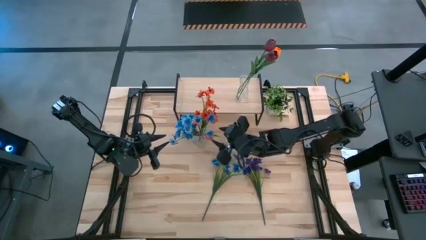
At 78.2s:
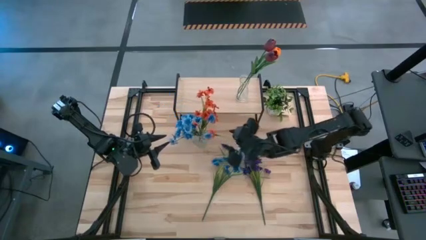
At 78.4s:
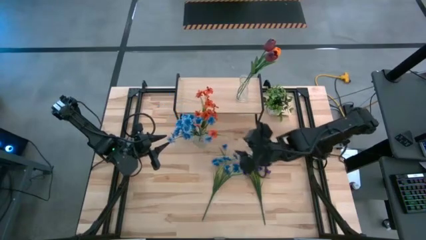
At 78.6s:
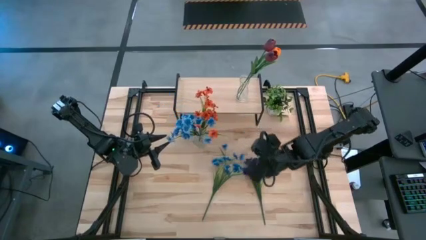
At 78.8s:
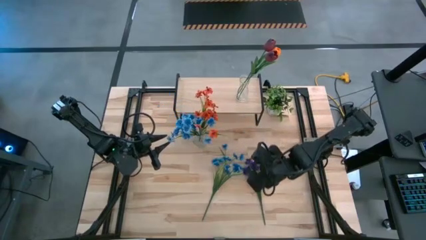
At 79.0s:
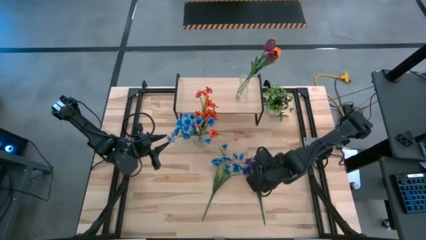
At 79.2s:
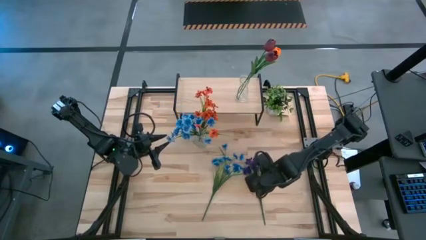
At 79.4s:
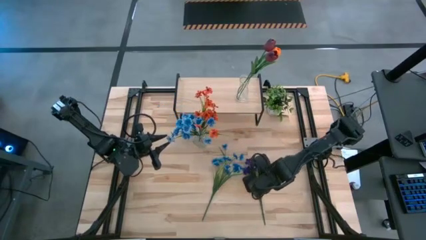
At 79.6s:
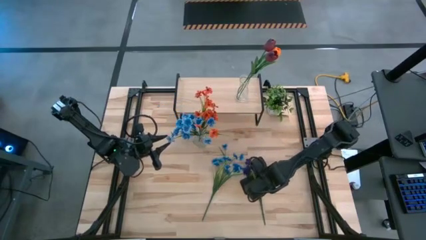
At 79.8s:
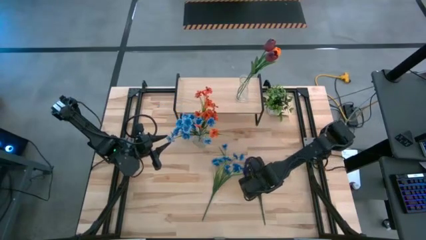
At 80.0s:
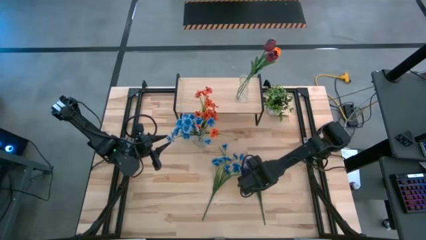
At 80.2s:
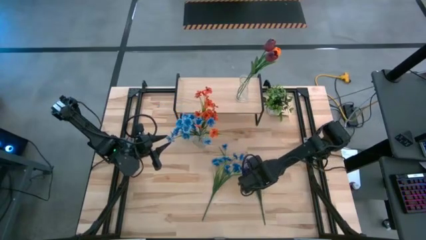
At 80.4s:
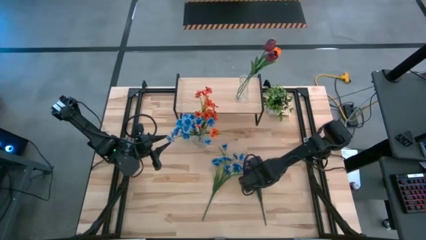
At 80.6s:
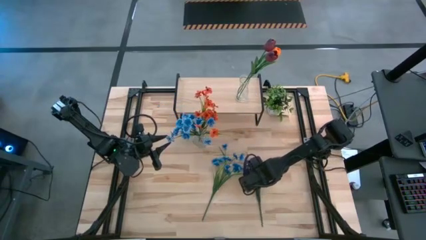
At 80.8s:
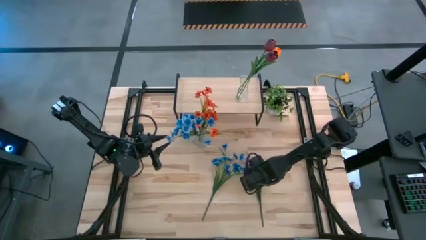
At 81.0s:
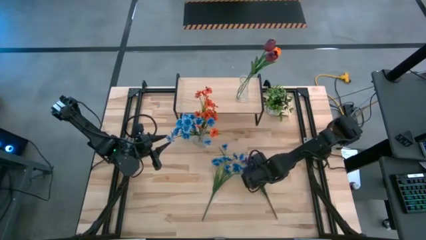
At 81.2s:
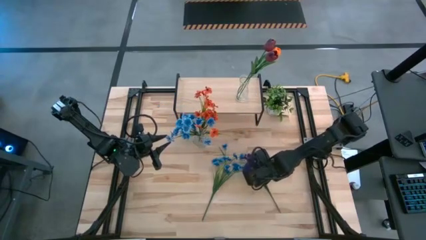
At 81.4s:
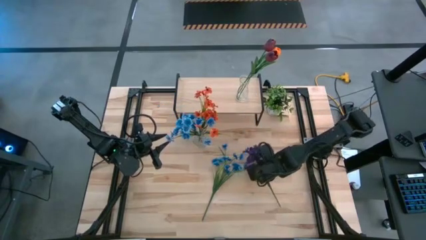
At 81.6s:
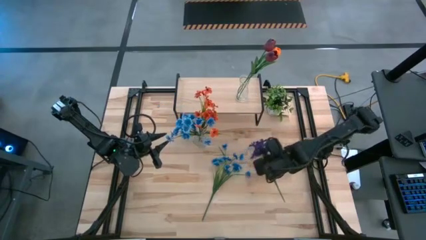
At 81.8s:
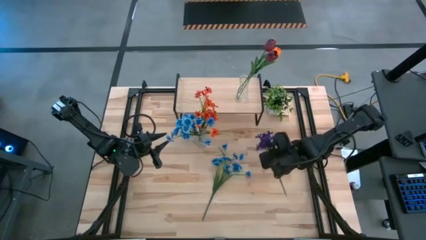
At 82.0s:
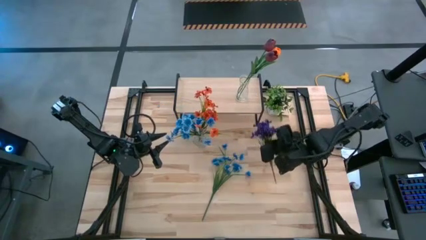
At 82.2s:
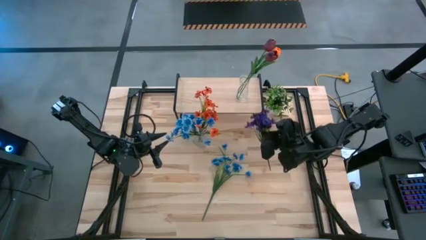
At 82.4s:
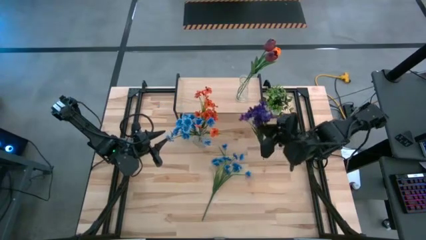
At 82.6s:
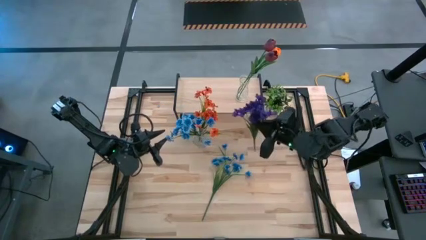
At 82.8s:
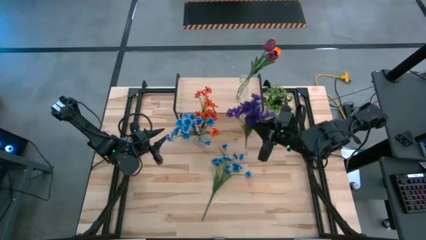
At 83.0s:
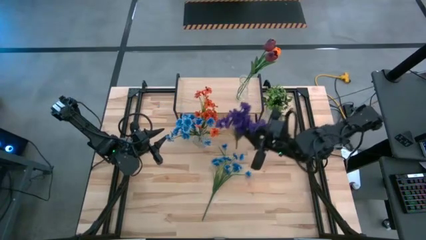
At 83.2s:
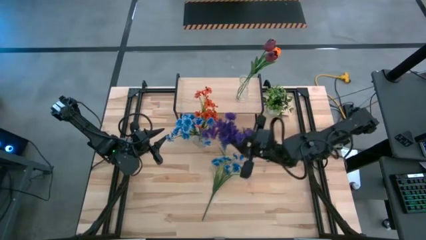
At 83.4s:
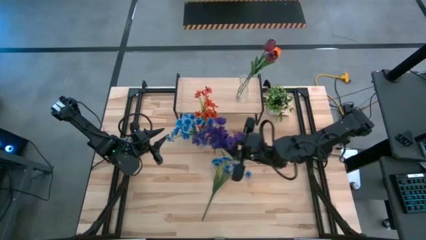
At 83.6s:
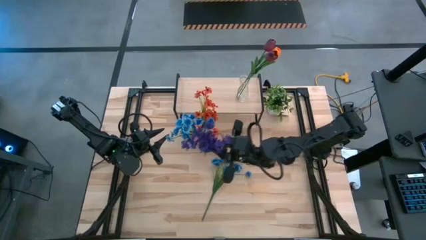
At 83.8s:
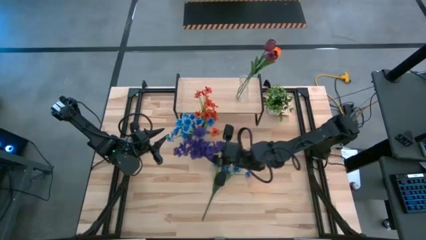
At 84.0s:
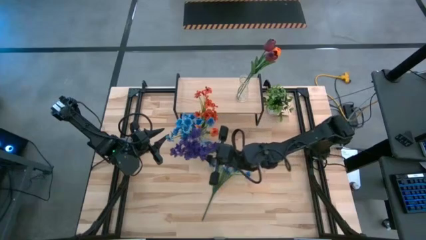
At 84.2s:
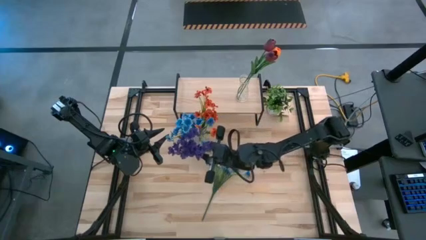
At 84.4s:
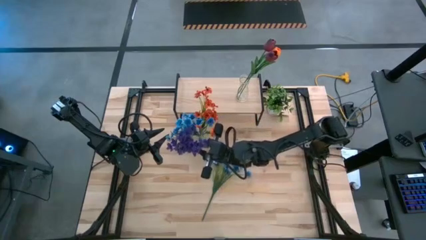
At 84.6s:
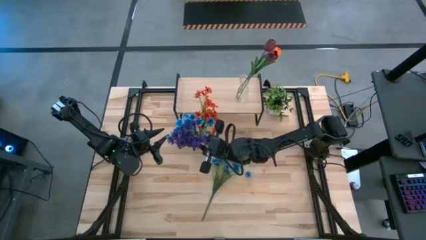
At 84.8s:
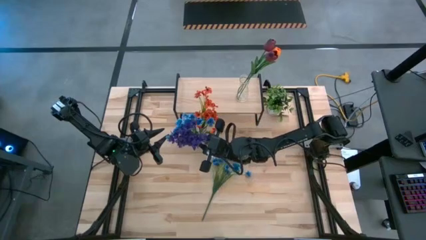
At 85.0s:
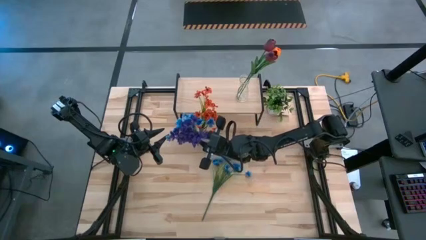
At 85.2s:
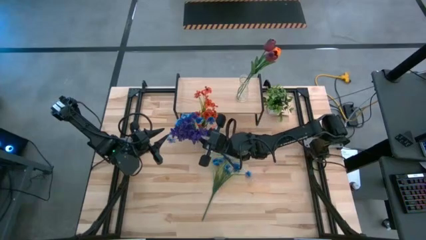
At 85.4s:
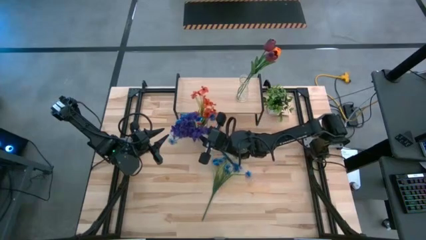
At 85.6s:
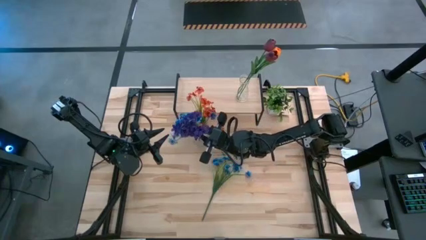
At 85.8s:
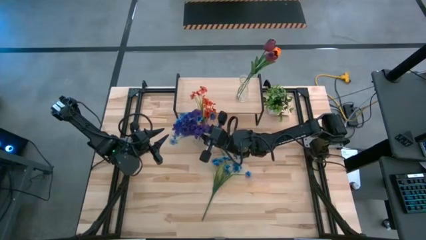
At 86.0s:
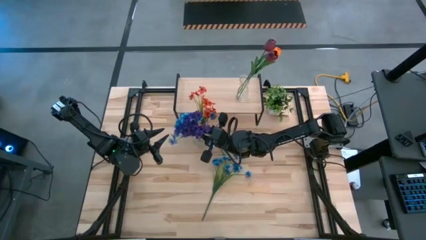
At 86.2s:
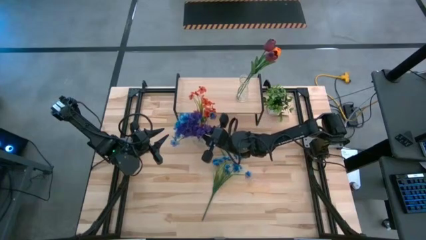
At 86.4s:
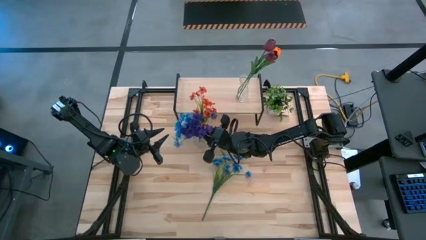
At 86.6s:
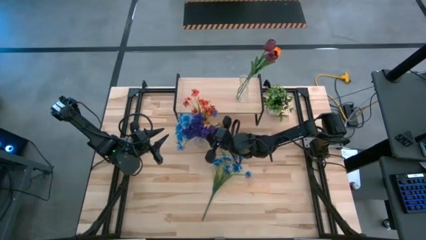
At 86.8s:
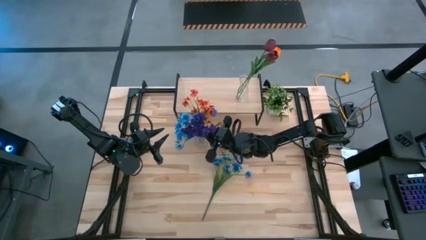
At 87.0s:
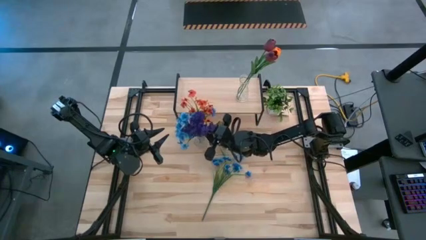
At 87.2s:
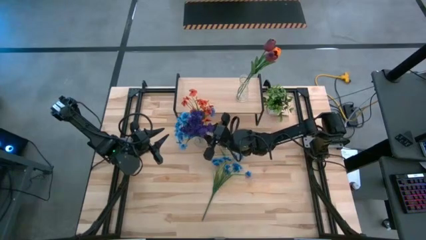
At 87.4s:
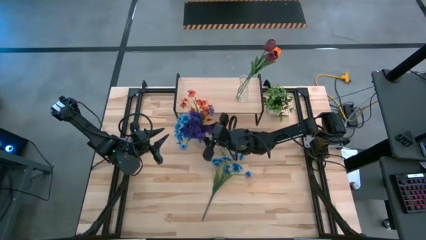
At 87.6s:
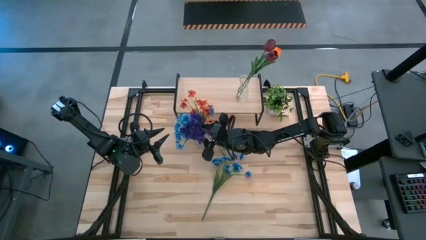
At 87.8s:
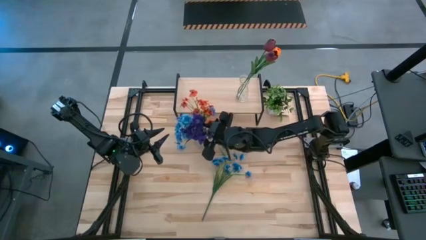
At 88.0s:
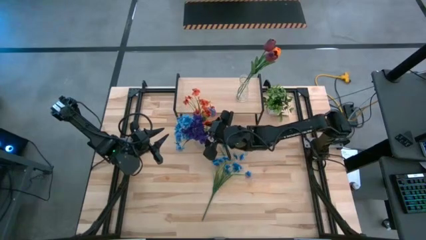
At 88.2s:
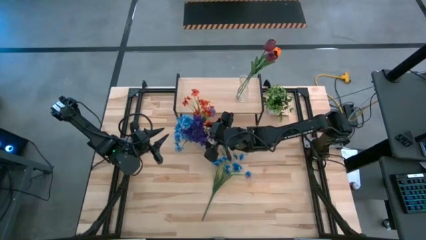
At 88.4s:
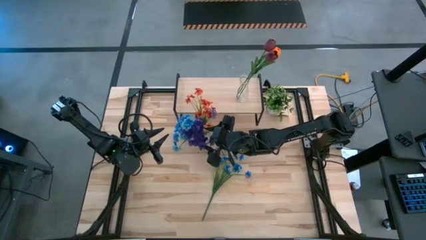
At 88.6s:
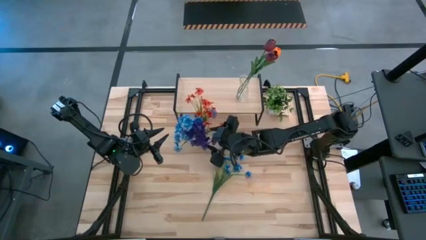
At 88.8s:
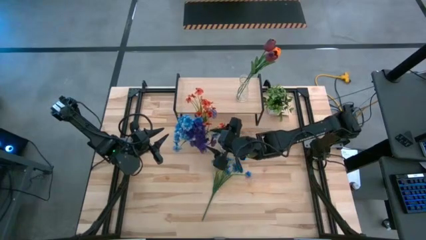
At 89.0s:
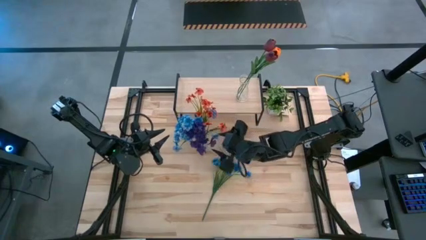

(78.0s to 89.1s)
Task: Pick and place flowers into a vace then onto a shelf
Put the purple flowers into the transparent vase
